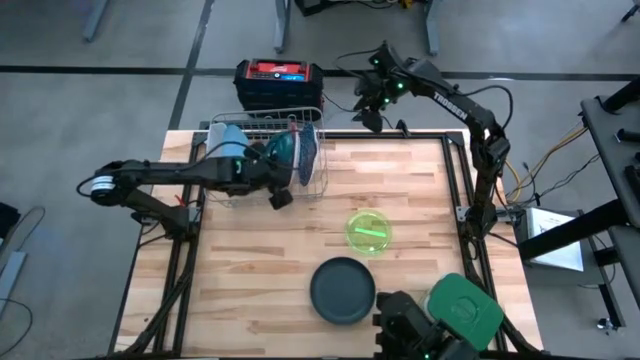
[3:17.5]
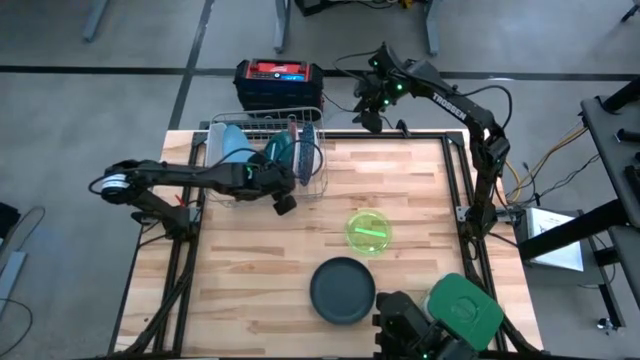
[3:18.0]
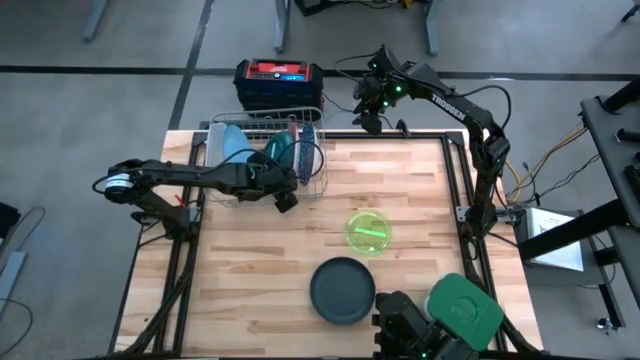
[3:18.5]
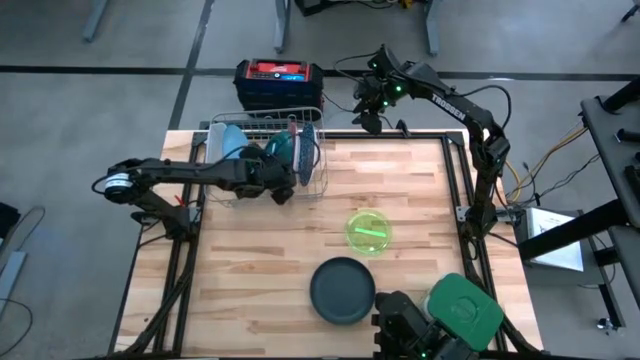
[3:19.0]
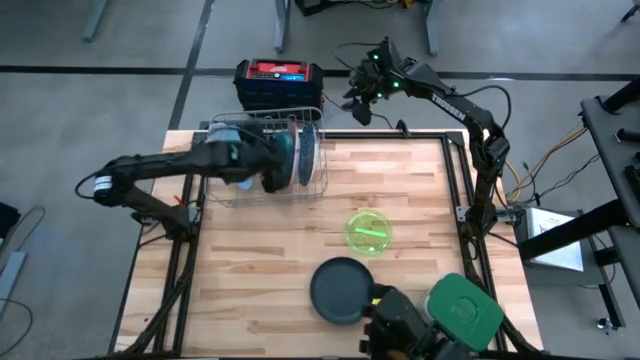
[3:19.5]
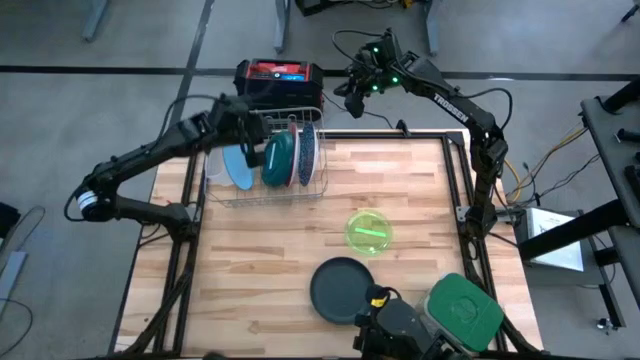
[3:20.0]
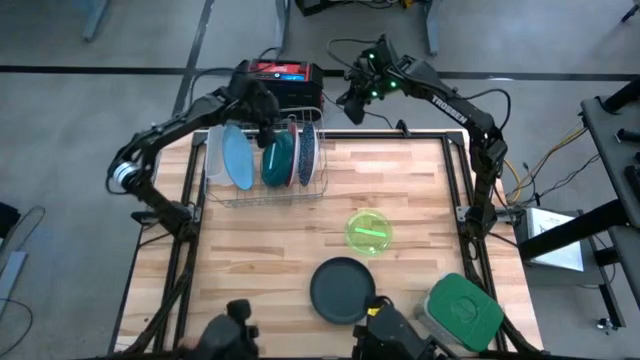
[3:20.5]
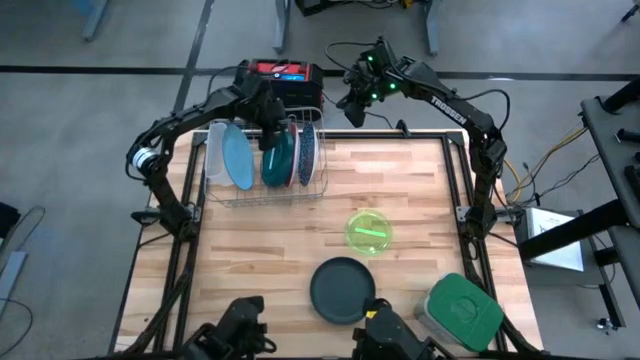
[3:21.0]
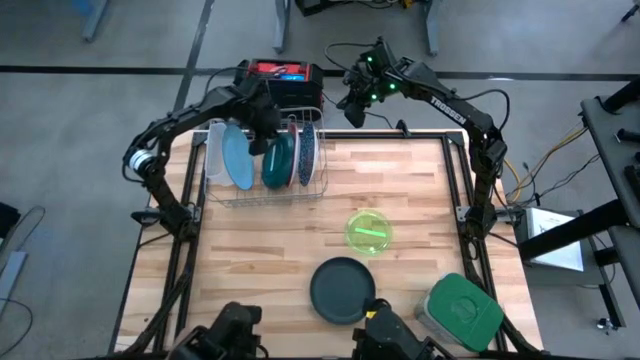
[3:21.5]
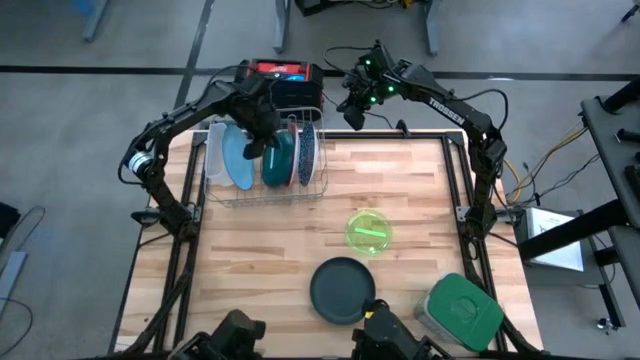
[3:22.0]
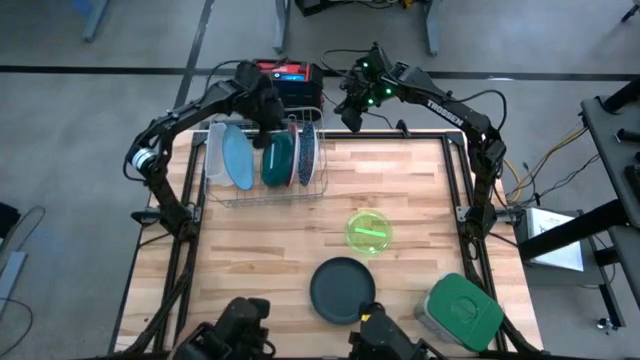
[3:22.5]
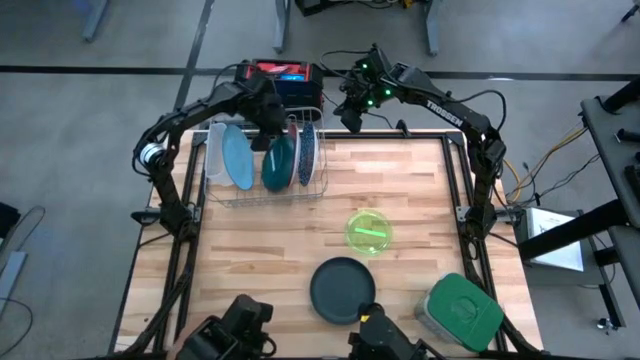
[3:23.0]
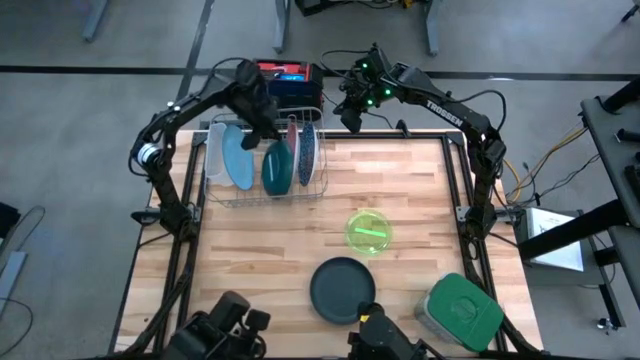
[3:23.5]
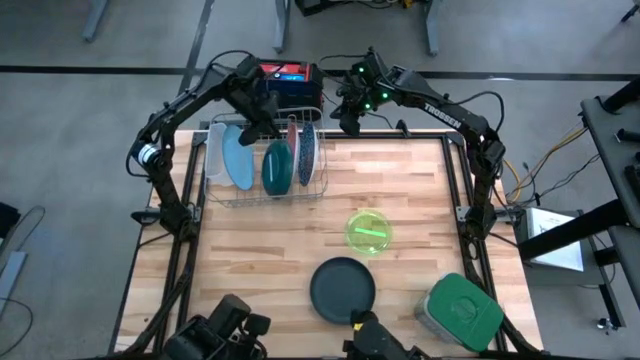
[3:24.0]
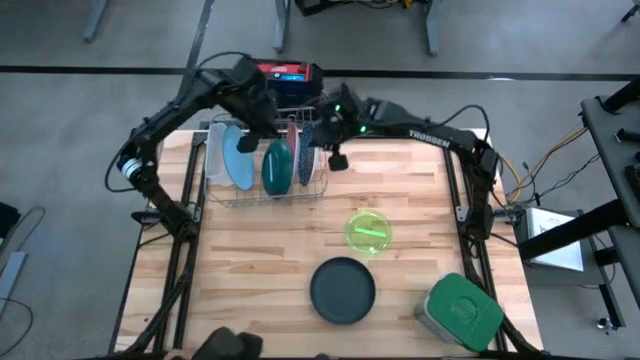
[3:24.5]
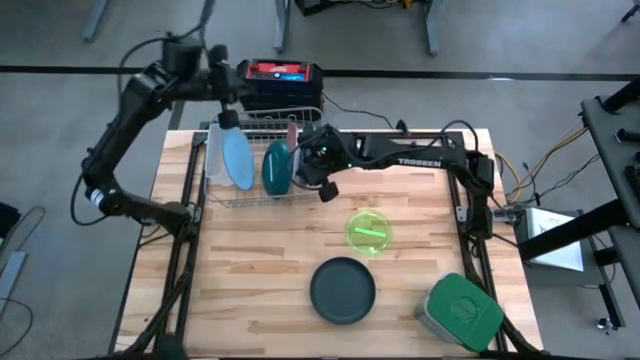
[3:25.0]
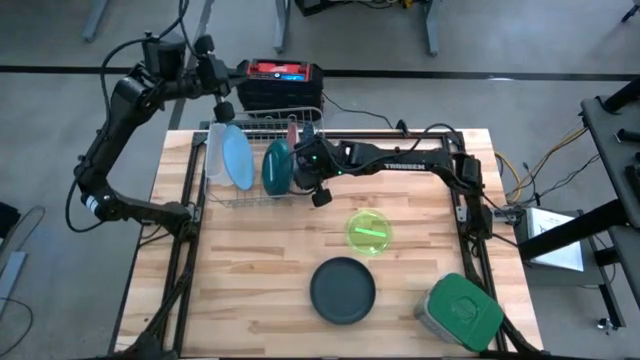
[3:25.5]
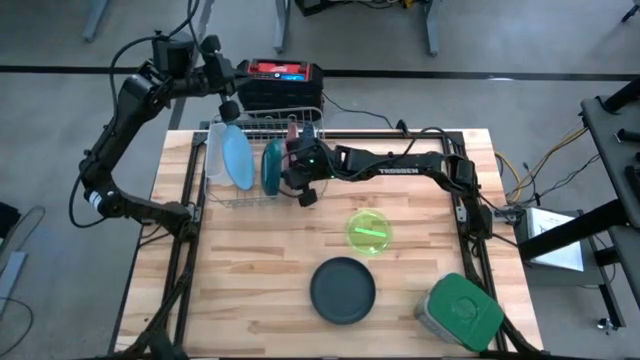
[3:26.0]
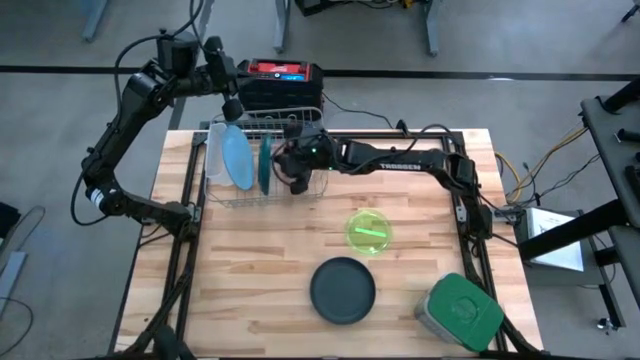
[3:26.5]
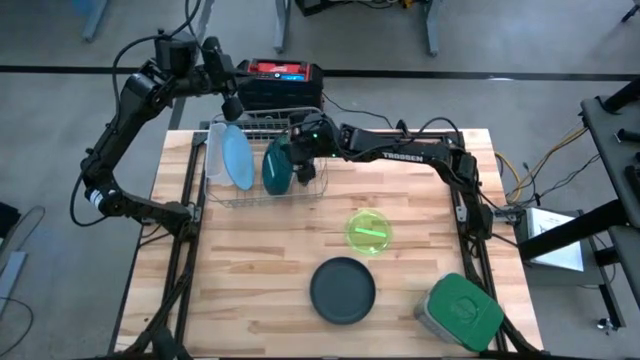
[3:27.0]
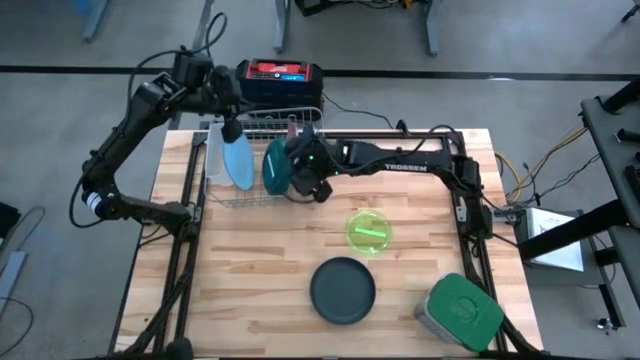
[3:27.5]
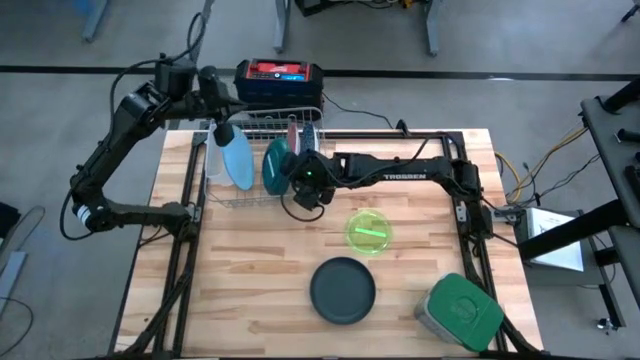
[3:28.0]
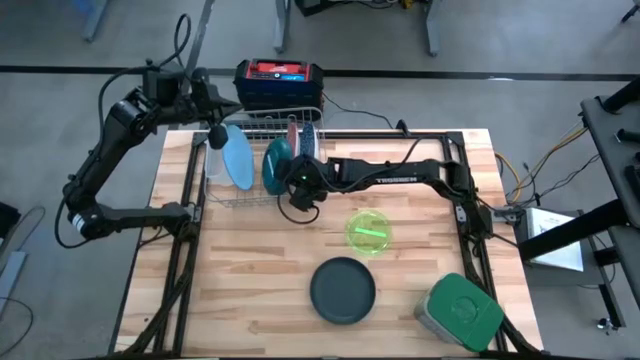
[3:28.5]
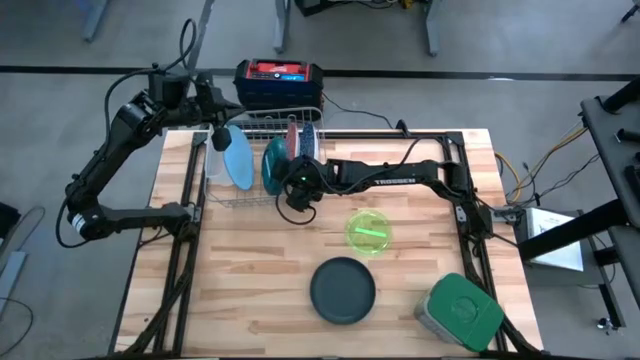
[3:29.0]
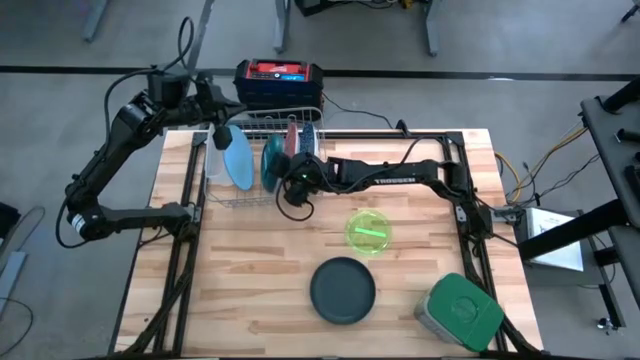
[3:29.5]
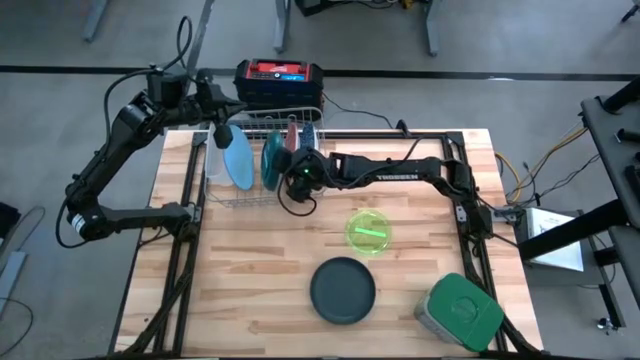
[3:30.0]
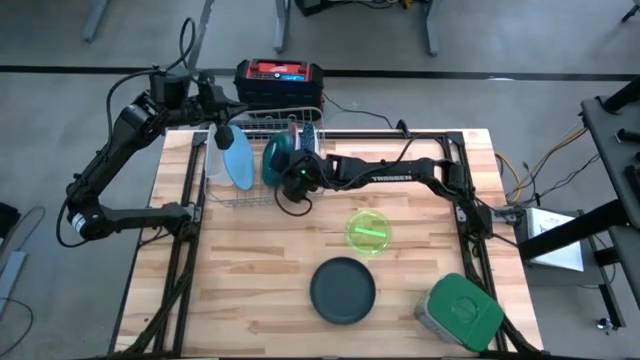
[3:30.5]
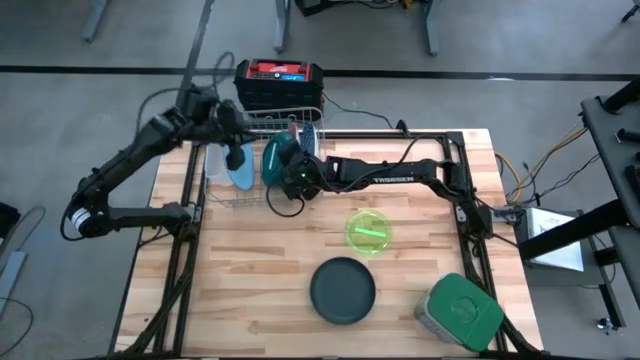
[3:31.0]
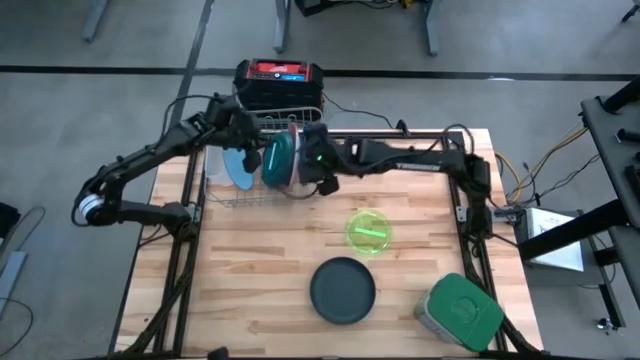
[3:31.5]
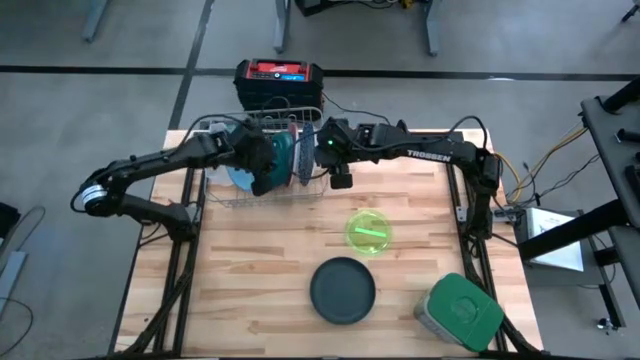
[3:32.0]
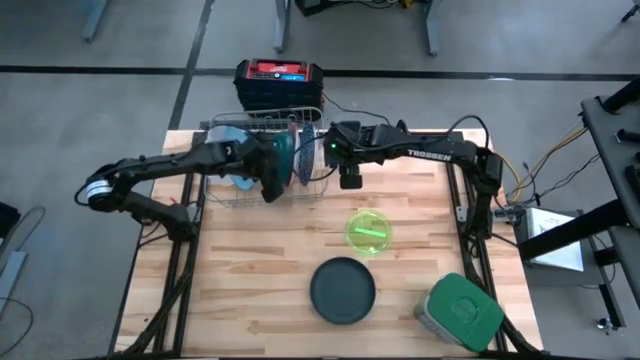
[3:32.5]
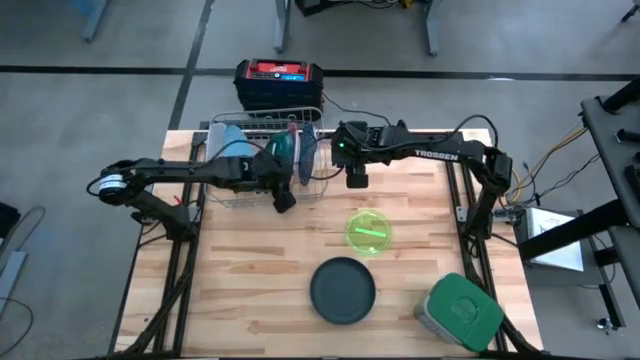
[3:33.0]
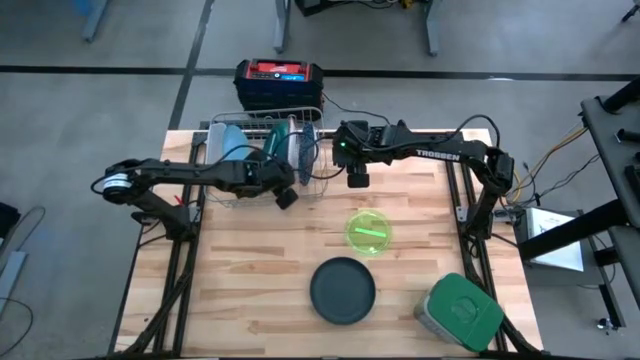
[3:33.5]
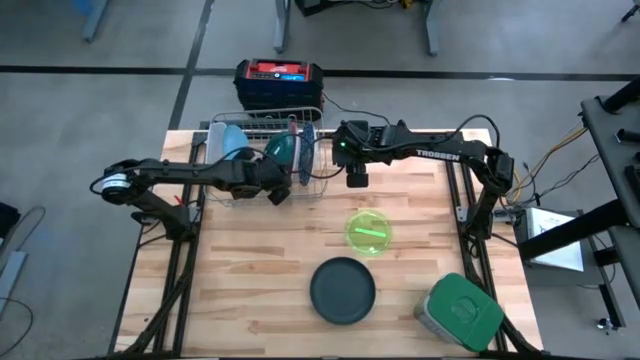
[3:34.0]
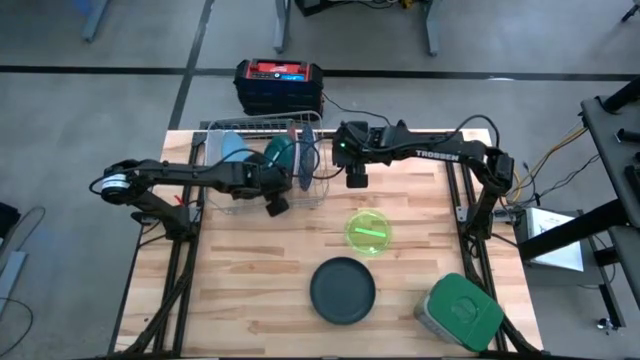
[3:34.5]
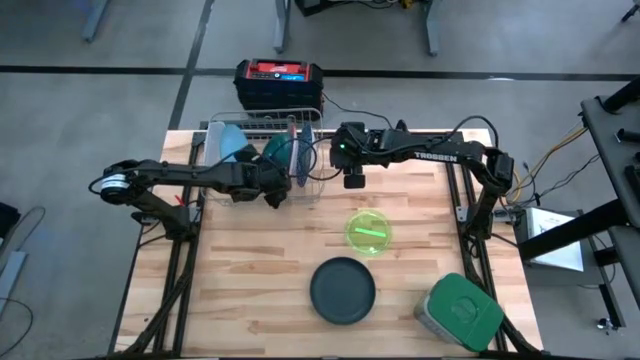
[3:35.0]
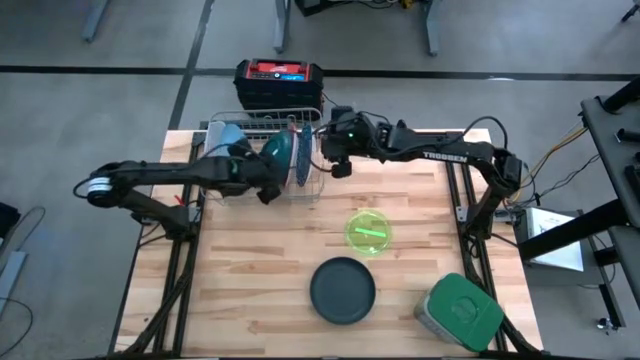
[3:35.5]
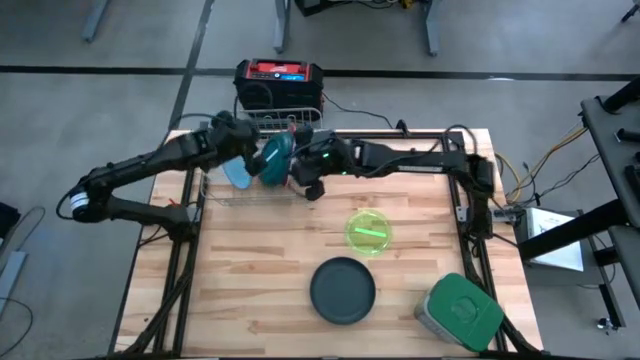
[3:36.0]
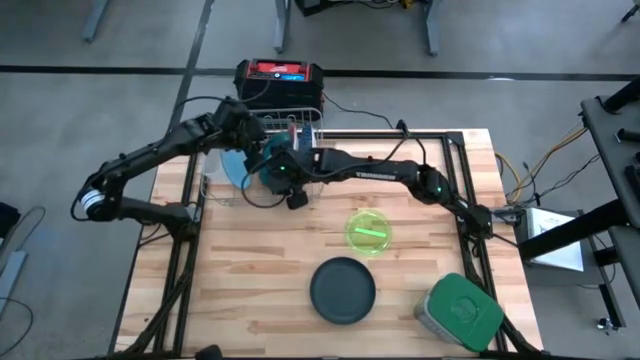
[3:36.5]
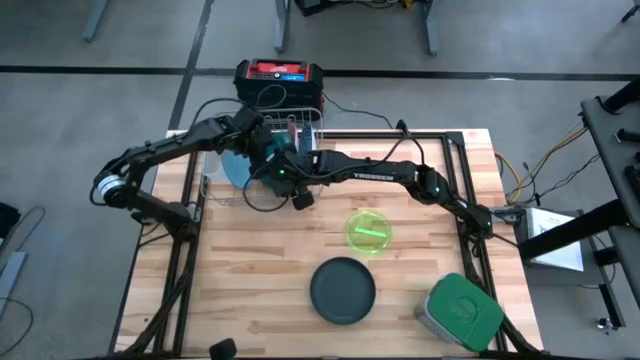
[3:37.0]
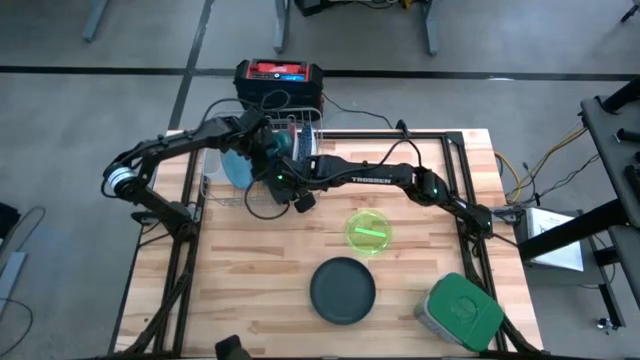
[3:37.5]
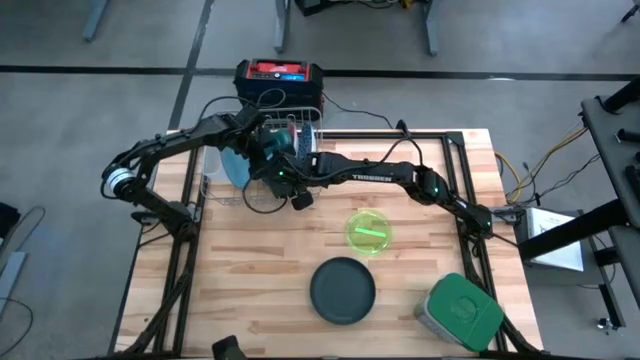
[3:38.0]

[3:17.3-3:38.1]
Task: Sort dishes
Put the green plate into the dish rack
